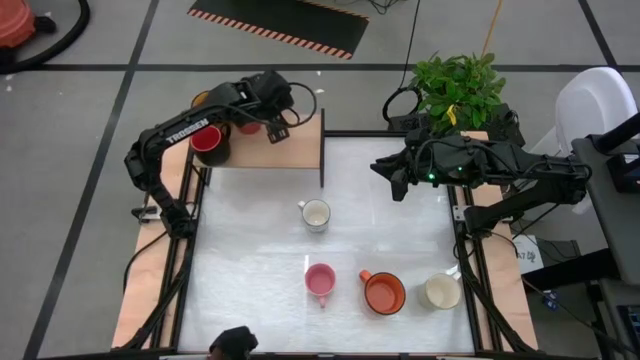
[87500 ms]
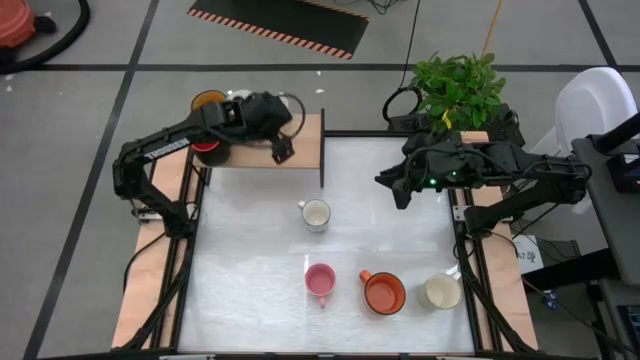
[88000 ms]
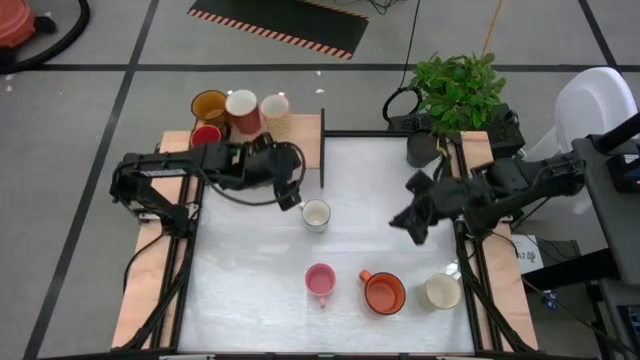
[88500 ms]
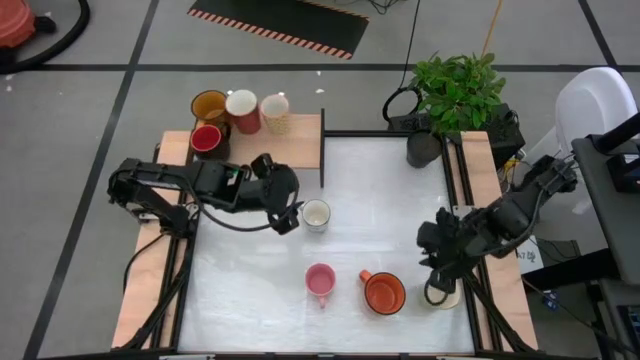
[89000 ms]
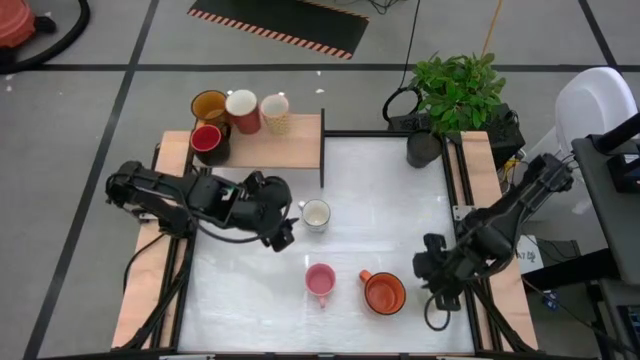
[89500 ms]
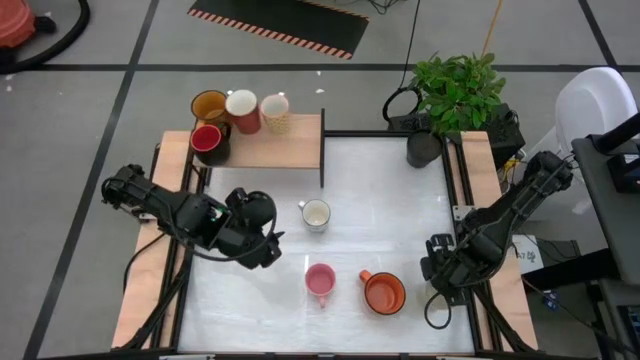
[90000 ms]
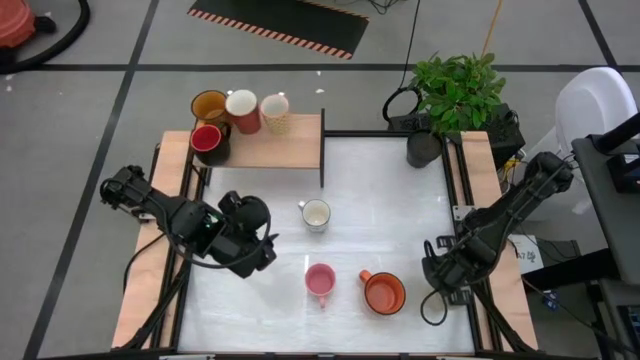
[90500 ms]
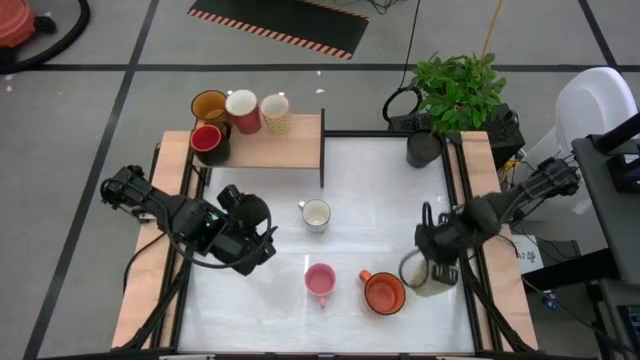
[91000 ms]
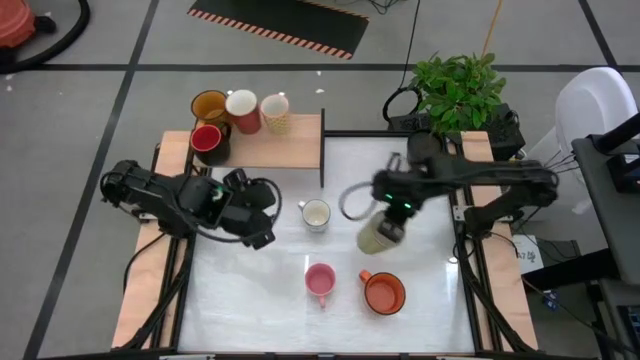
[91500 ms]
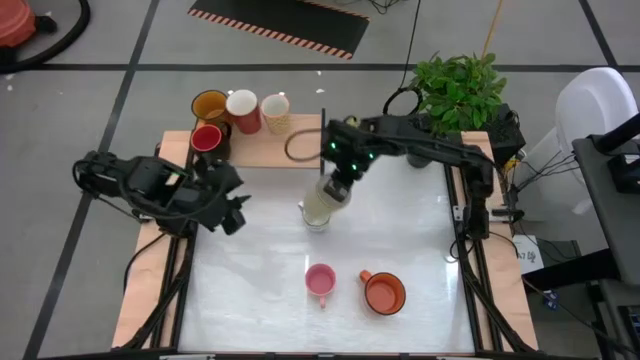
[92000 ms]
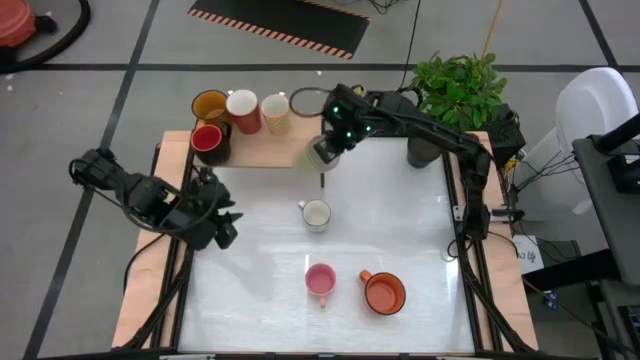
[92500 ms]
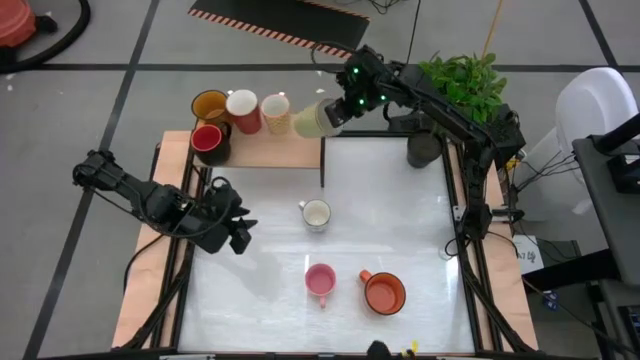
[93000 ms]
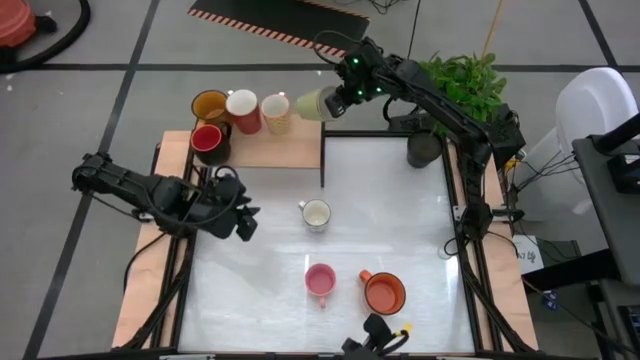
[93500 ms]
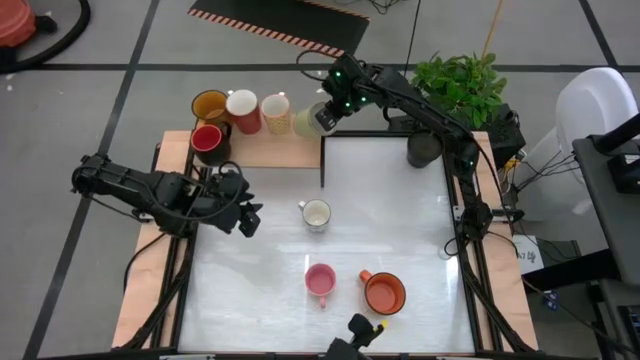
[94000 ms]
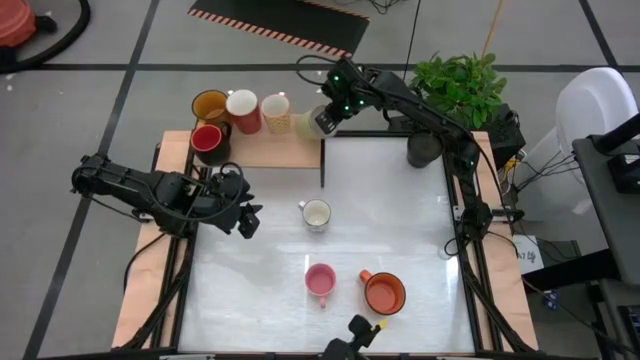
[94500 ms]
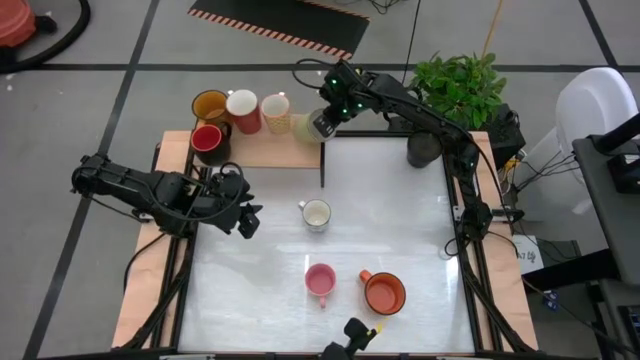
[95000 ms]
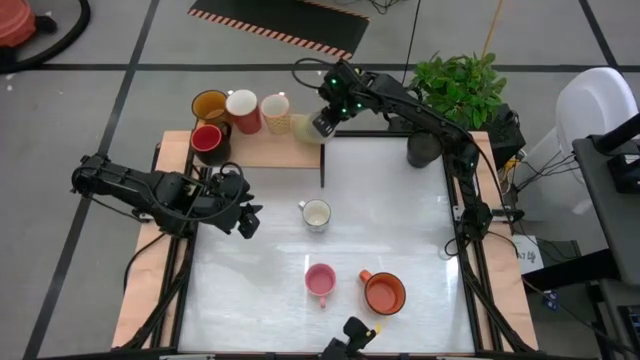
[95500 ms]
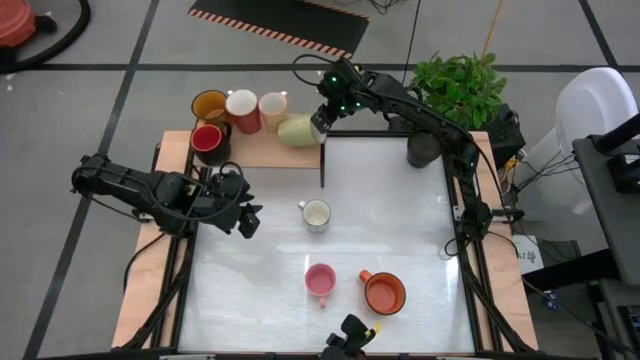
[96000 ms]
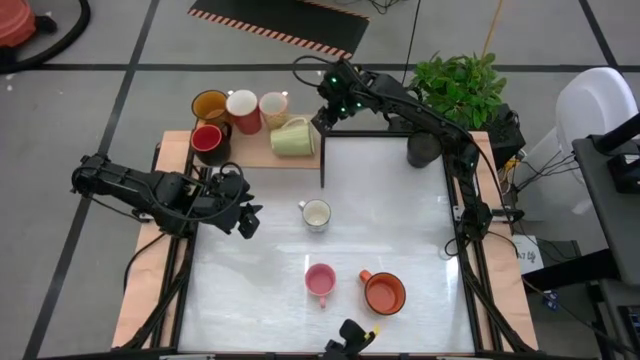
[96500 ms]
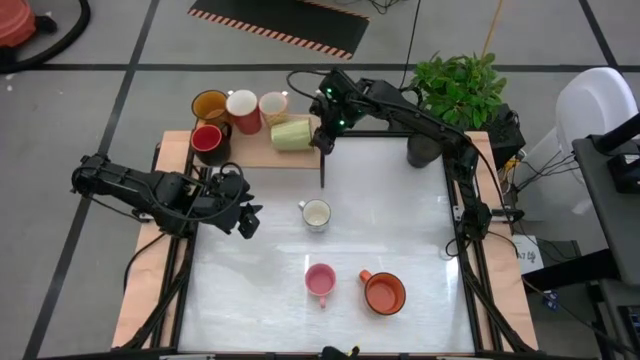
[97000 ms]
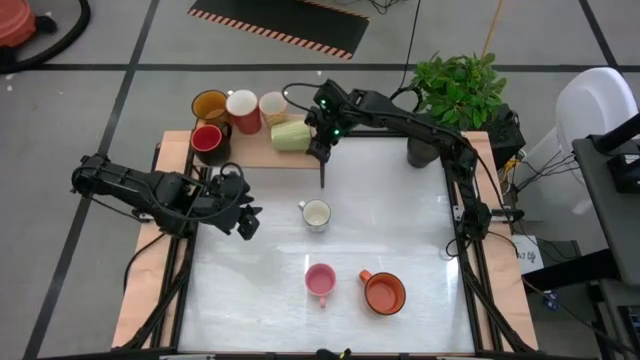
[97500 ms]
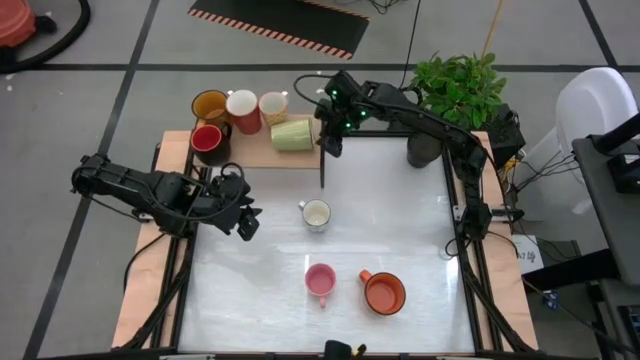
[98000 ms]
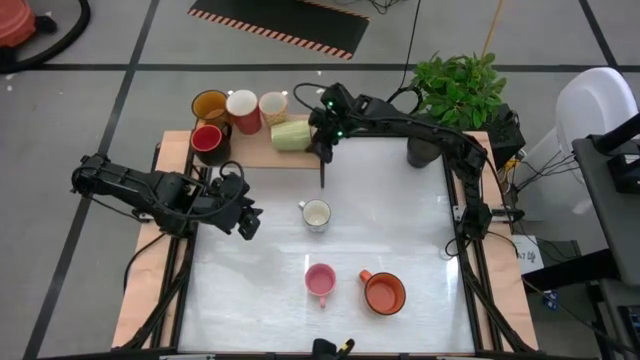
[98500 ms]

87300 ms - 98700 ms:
Task: Place coffee mugs
Put the green mug on the shelf

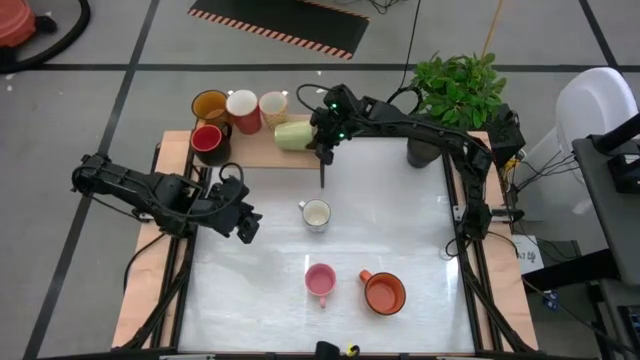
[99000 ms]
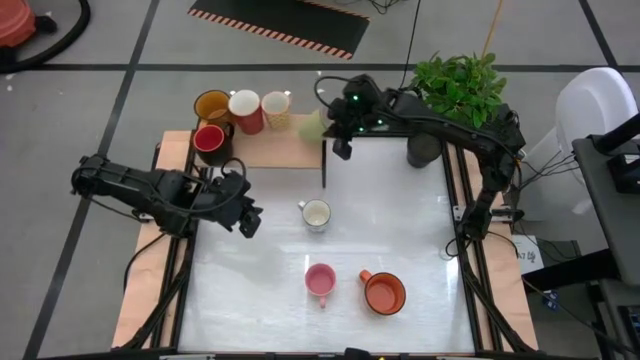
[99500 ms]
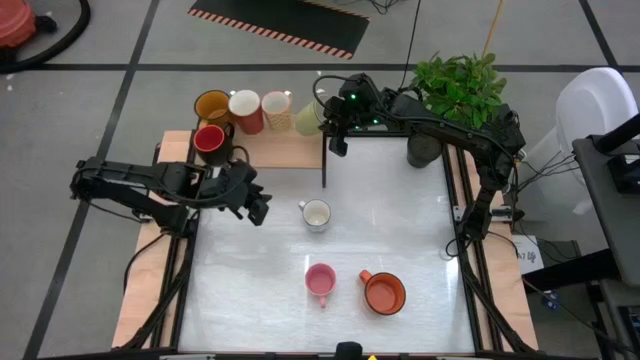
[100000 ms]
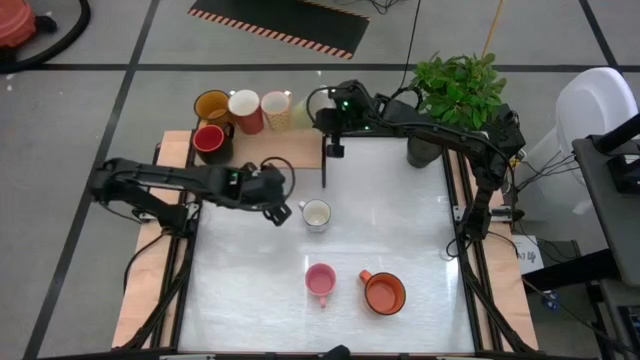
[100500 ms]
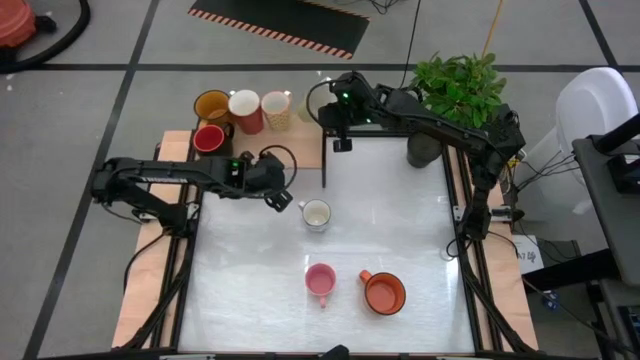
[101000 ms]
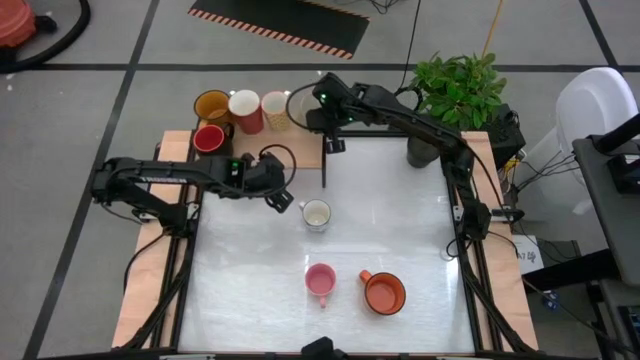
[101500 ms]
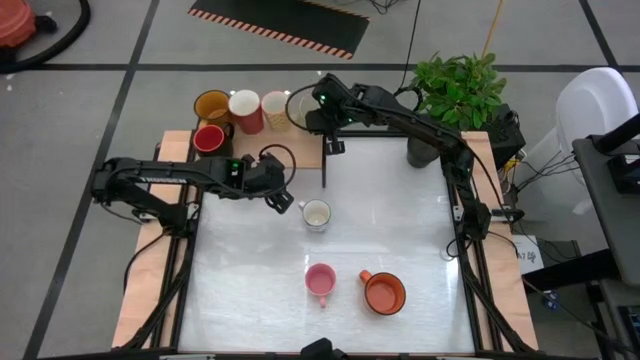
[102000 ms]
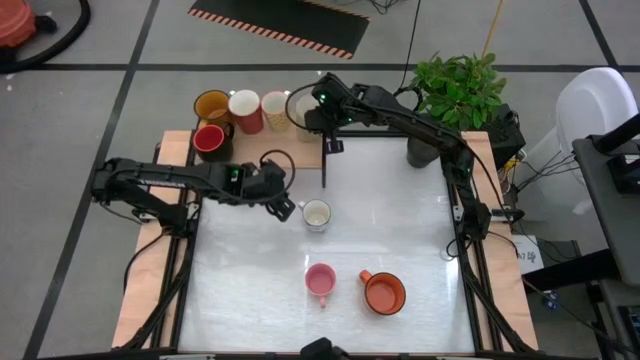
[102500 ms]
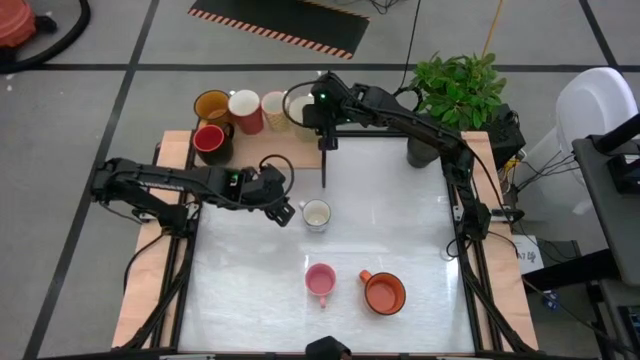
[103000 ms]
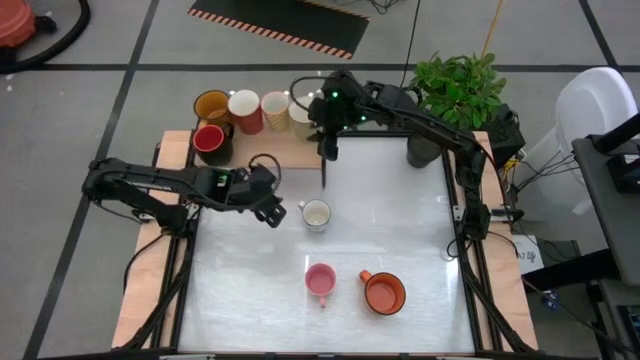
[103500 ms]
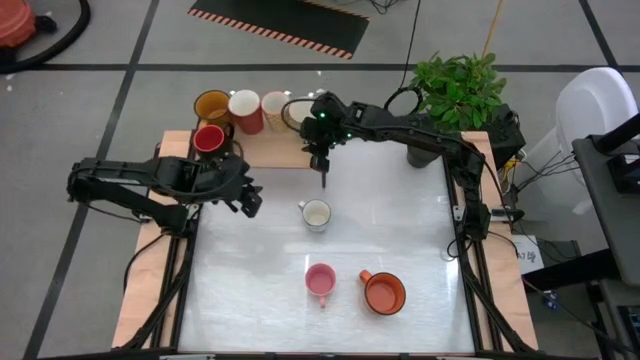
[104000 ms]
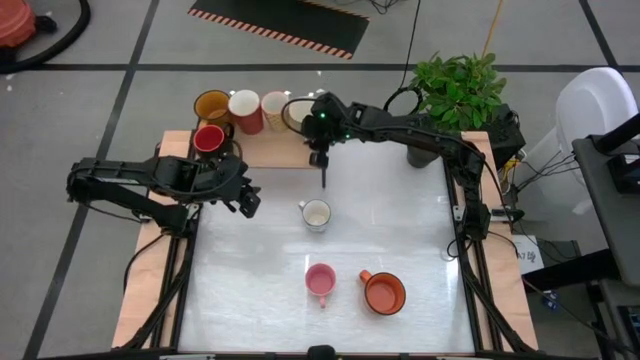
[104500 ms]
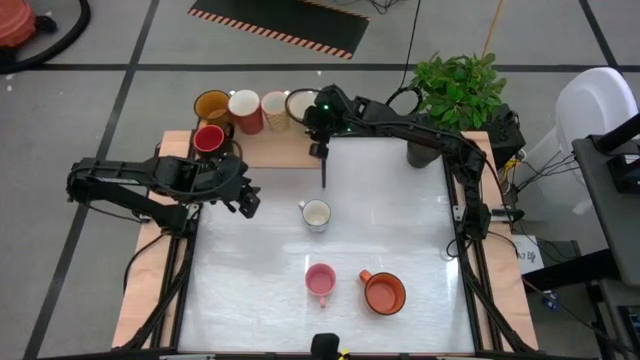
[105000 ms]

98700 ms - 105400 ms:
Put the green mug on the shelf

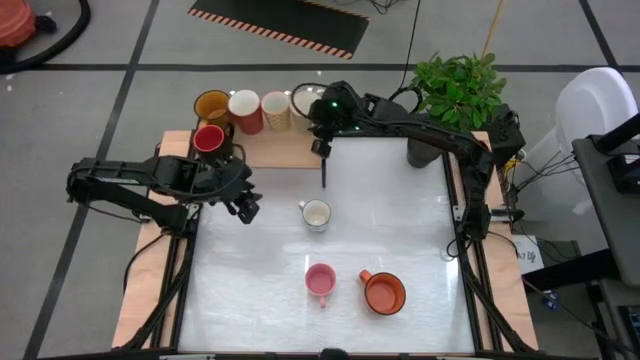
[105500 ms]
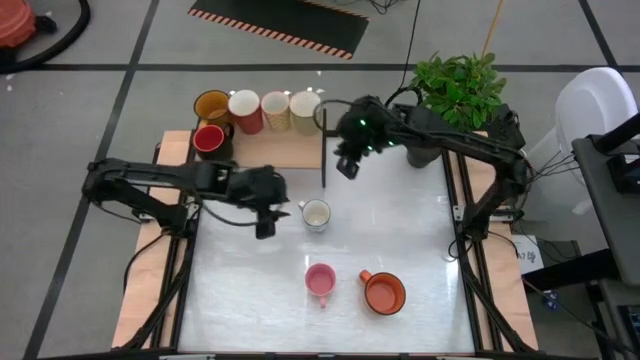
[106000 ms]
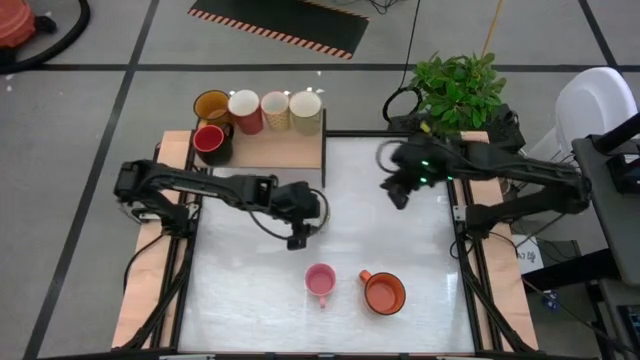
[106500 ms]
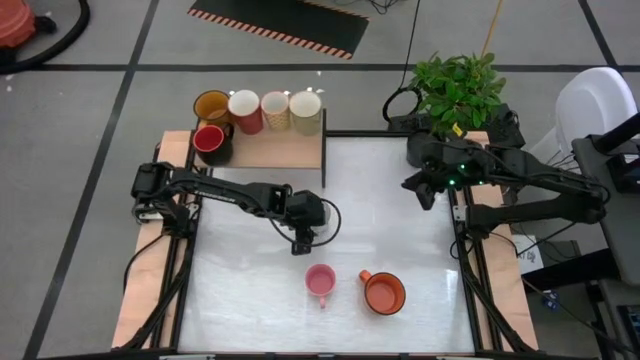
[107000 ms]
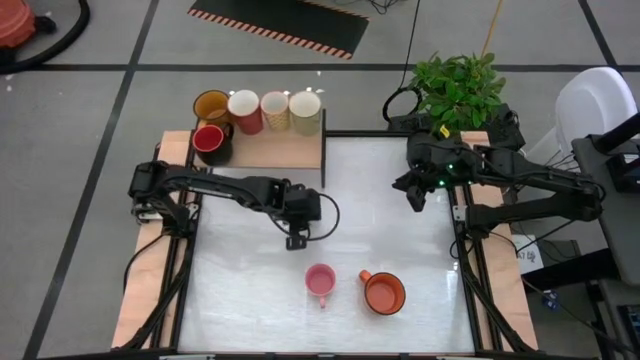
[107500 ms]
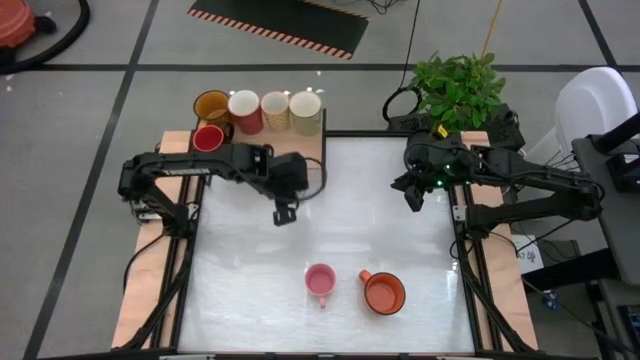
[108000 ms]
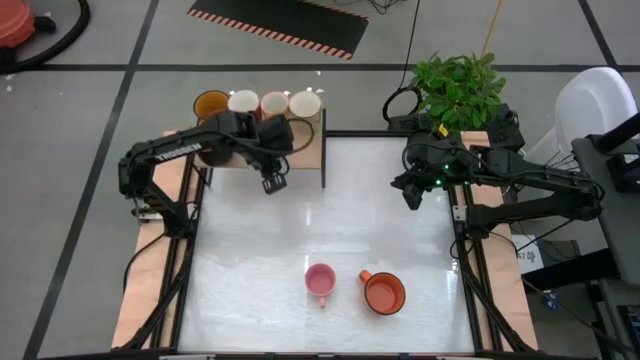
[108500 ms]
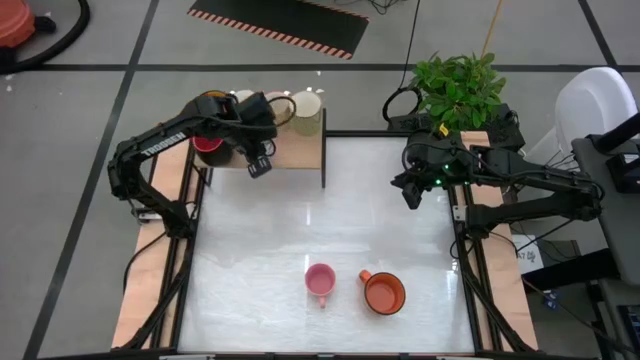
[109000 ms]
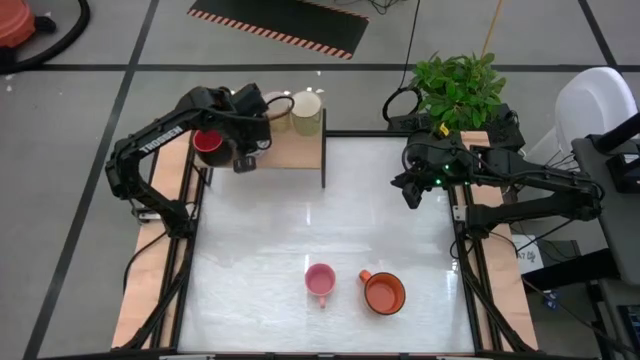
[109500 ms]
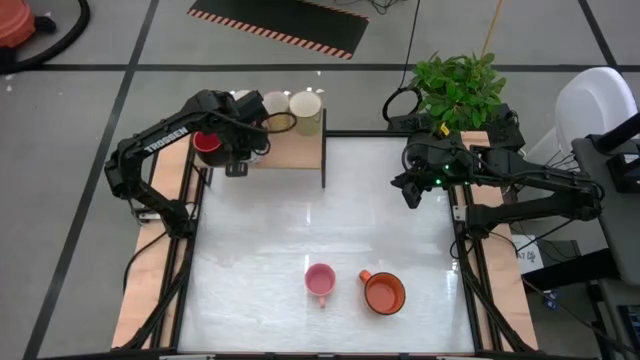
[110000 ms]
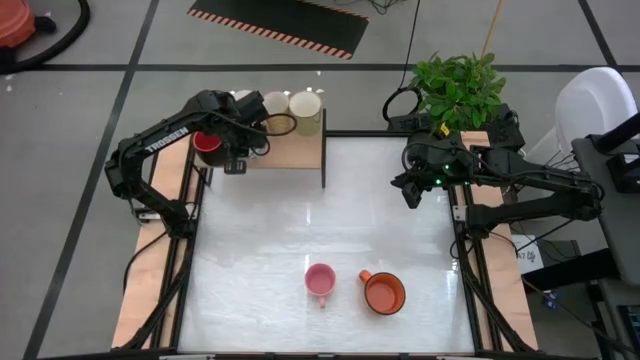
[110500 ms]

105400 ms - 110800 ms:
Put the blue patterned mug on the shelf
